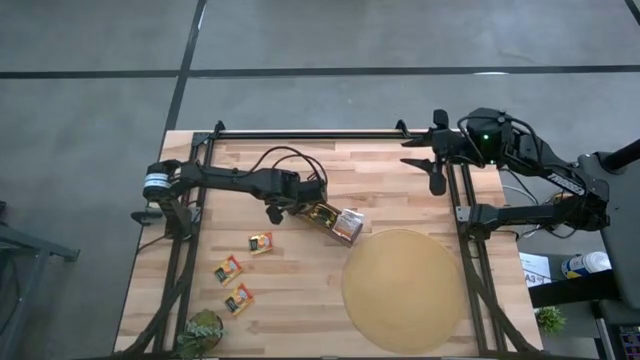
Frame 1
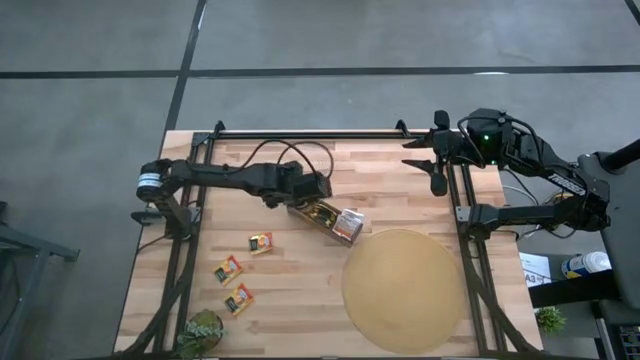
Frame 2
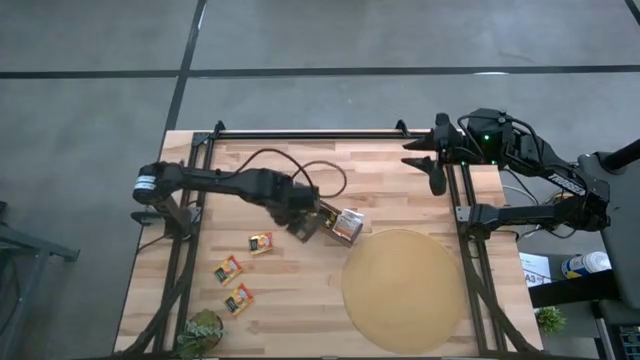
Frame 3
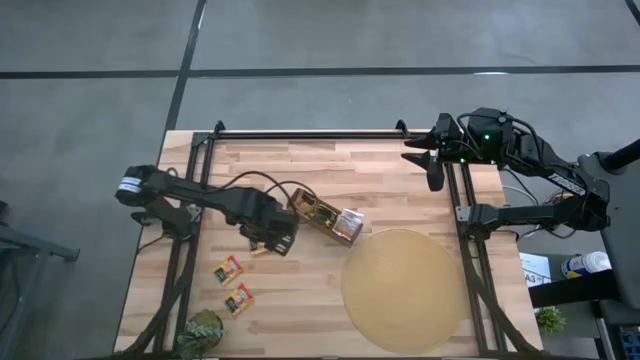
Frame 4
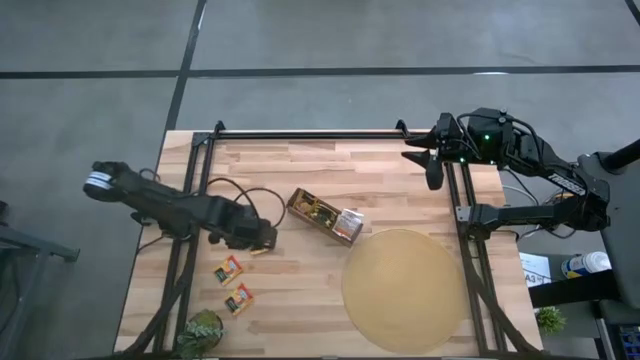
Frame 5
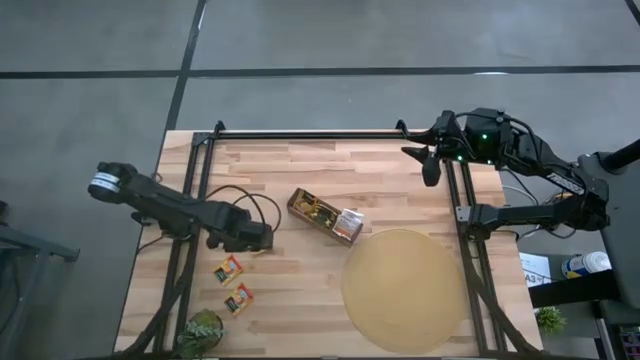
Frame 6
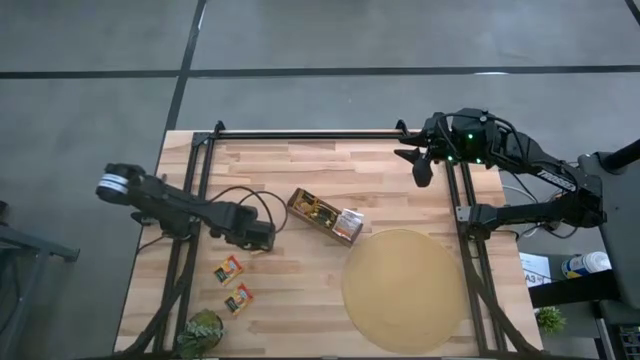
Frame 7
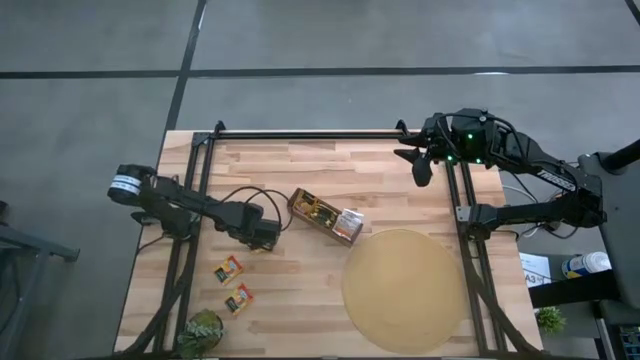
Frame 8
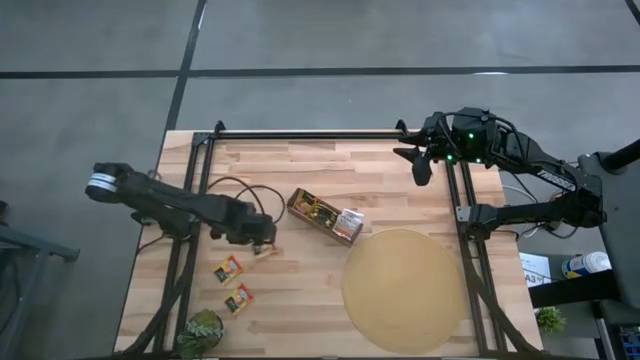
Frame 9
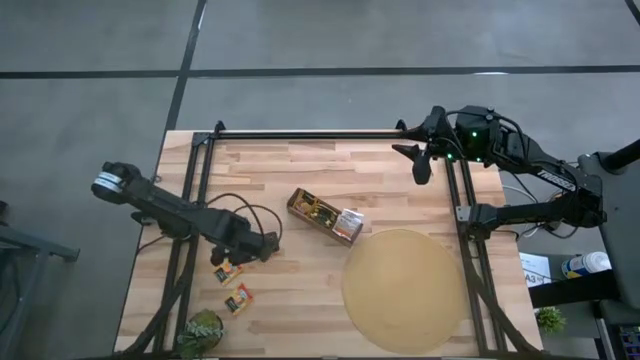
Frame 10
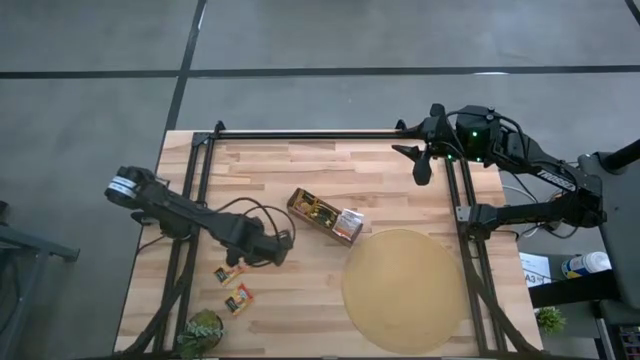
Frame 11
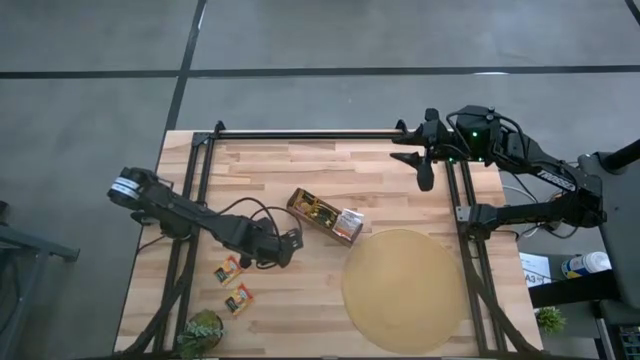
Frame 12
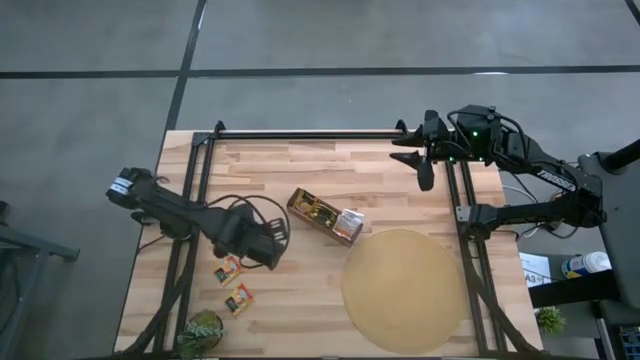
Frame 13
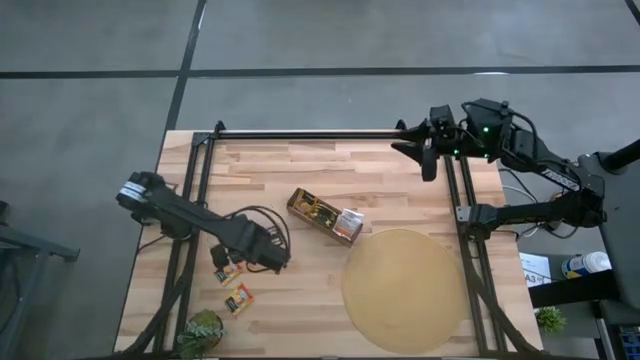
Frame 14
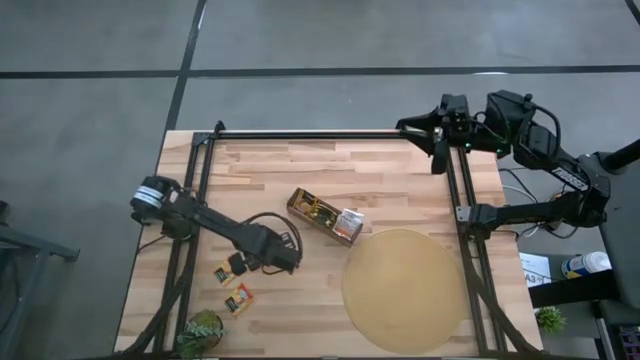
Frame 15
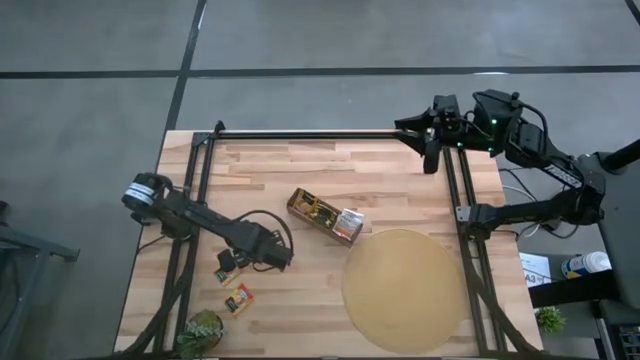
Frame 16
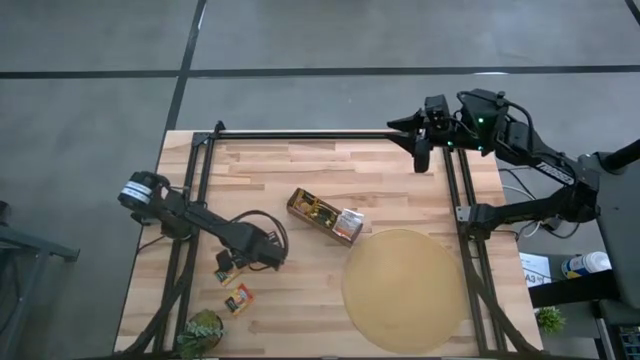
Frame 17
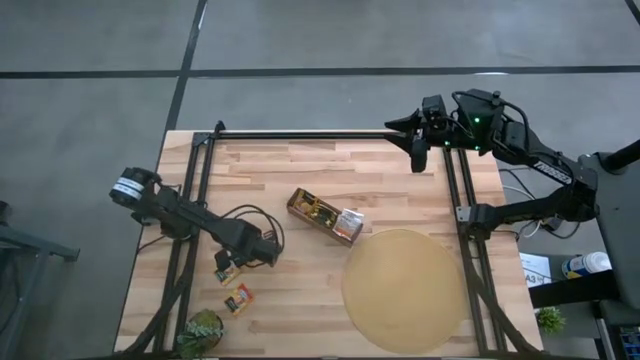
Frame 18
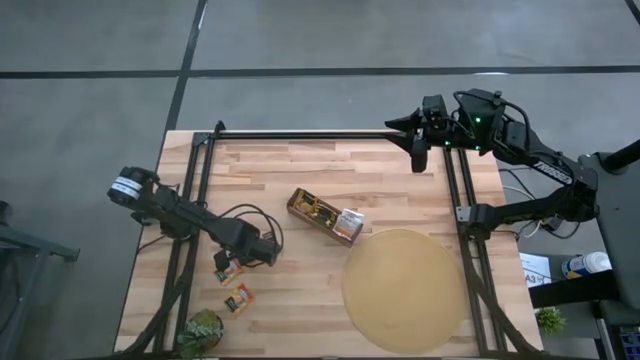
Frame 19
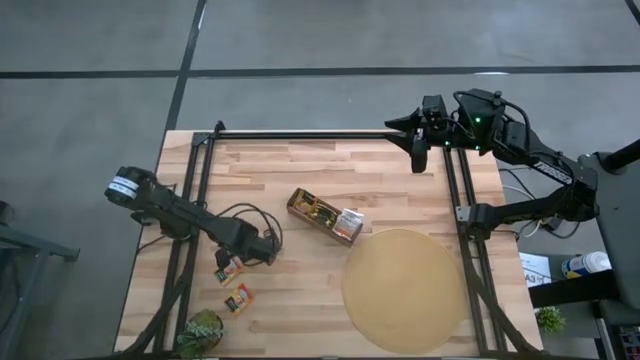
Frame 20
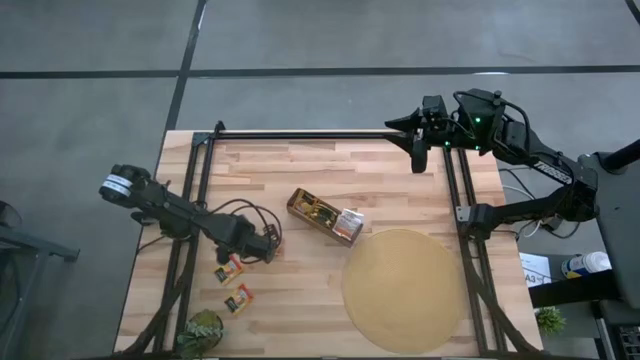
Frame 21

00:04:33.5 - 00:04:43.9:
Task: Pick & Place Tea
Put the orange tea bag into the left section of the wooden organizer

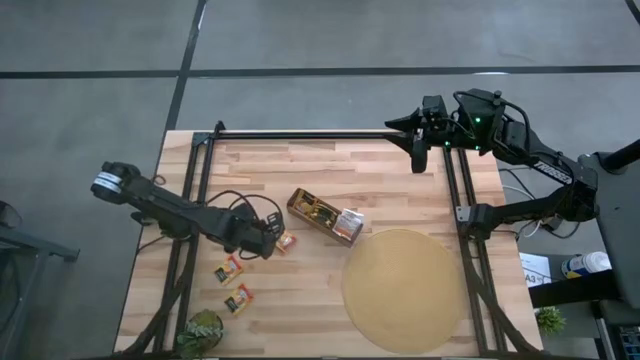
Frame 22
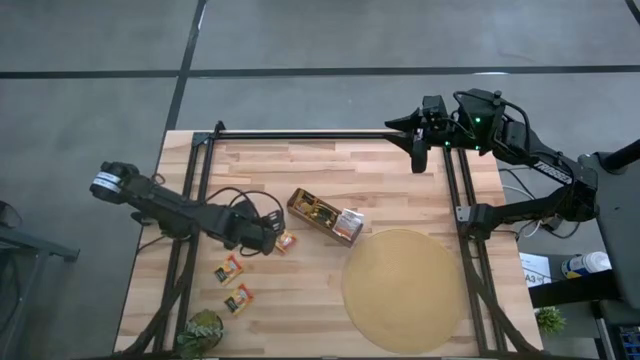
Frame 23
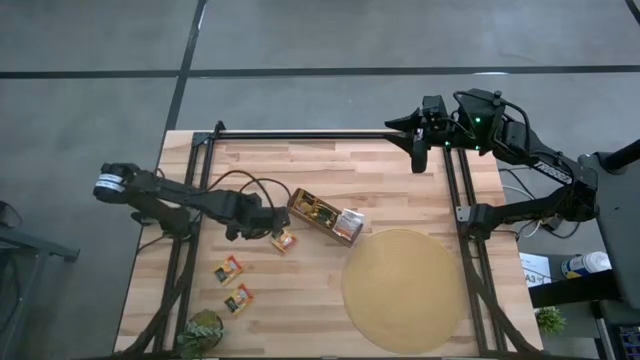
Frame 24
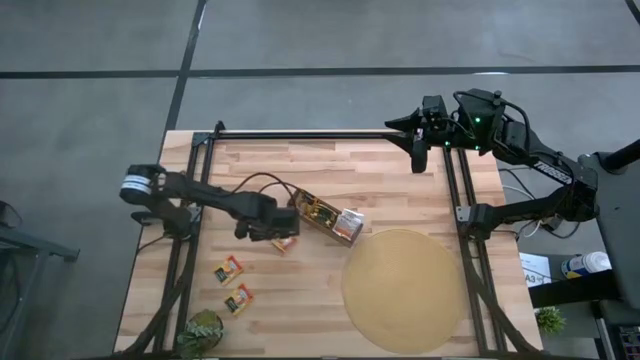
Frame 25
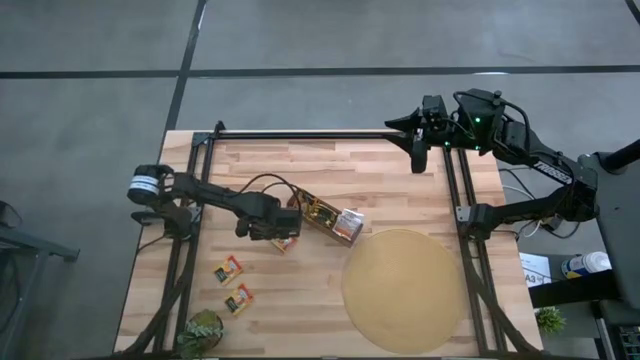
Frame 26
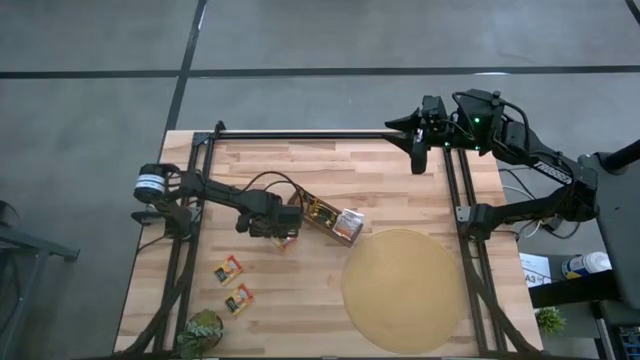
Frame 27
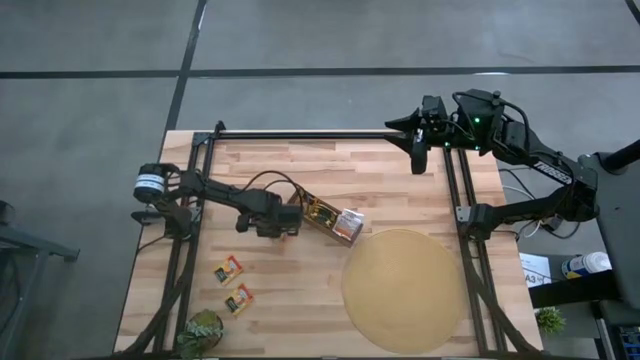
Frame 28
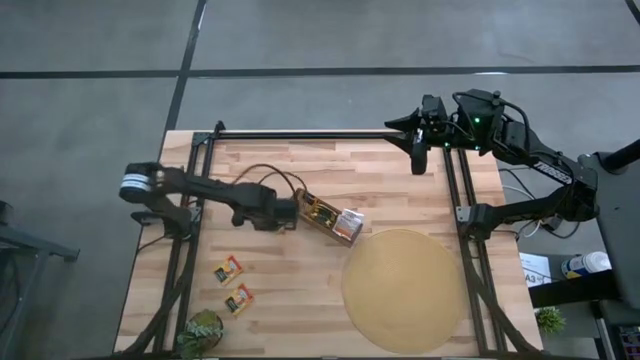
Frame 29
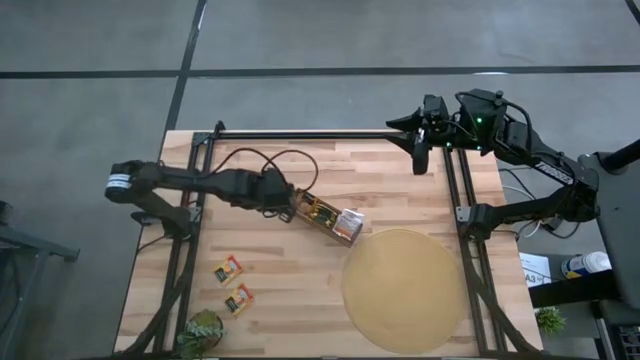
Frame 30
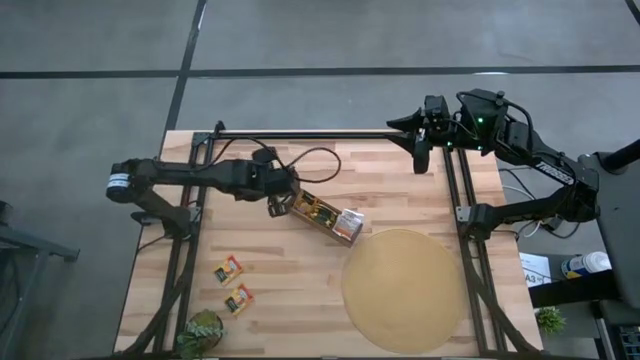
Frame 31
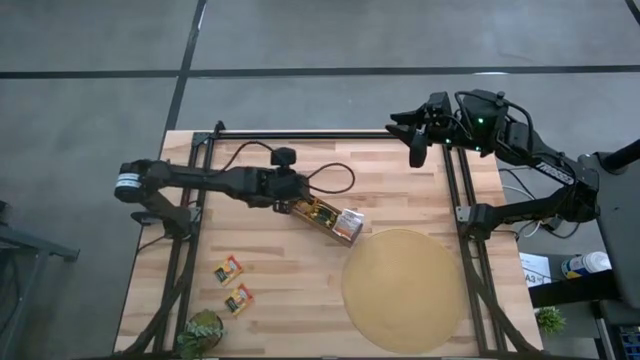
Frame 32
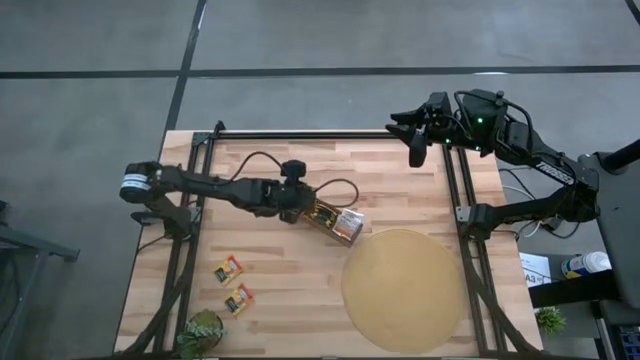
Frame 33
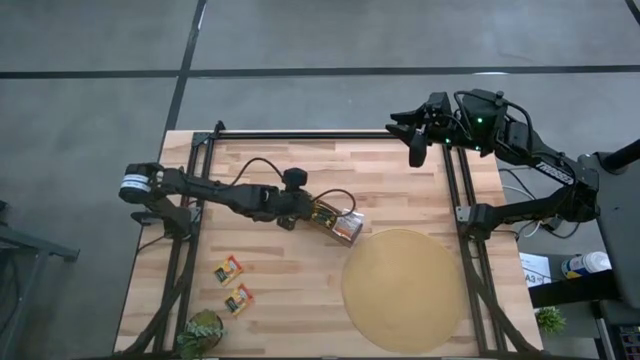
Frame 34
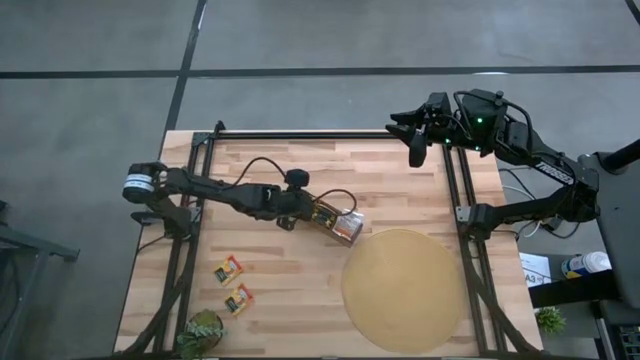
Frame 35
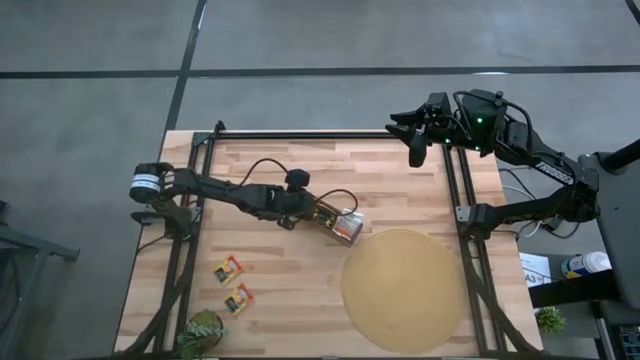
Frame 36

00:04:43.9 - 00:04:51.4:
Put the orange tea bag into the left section of the wooden organizer

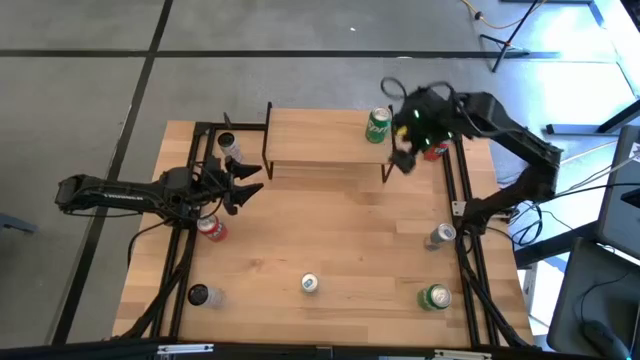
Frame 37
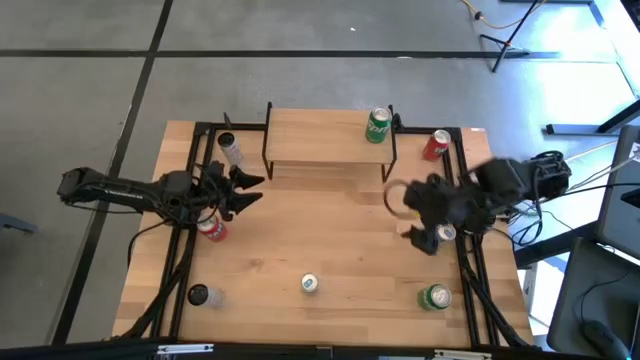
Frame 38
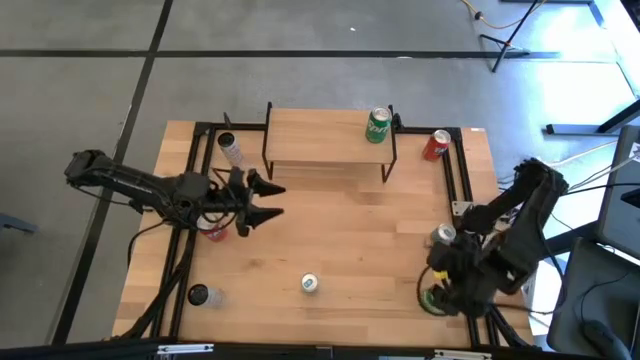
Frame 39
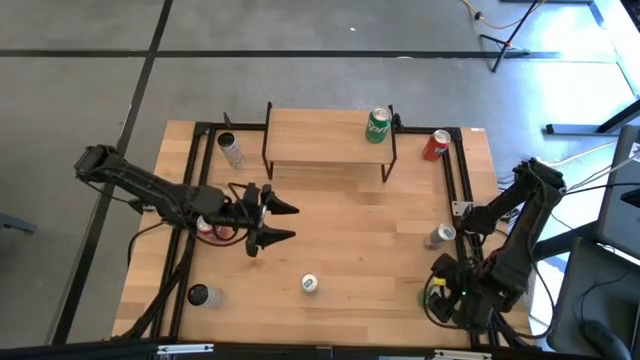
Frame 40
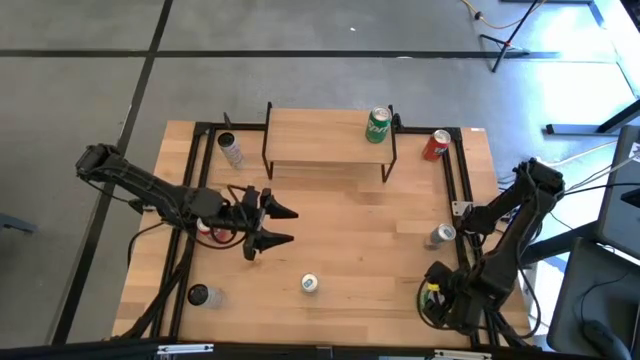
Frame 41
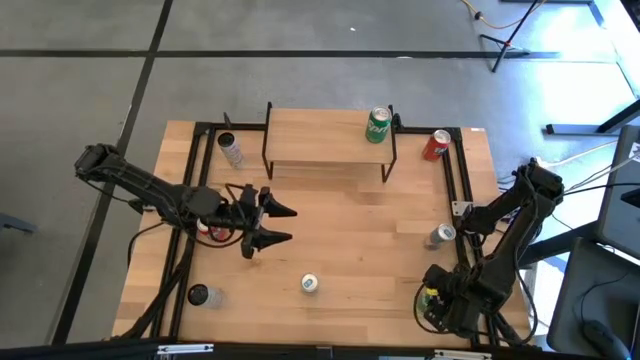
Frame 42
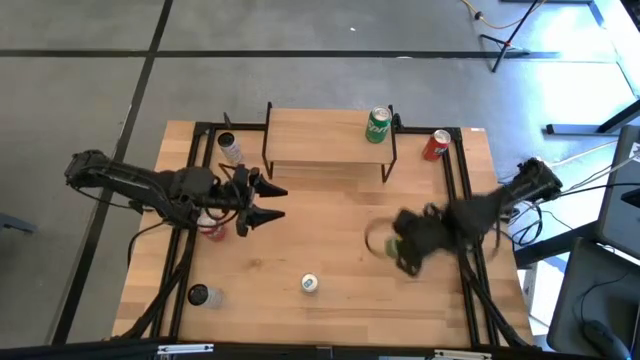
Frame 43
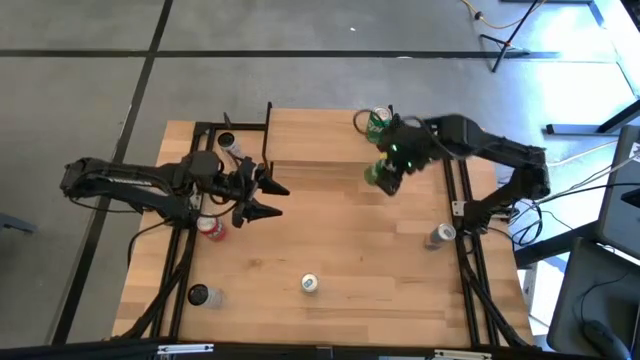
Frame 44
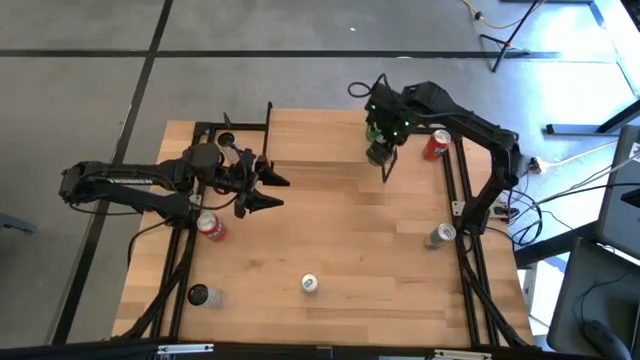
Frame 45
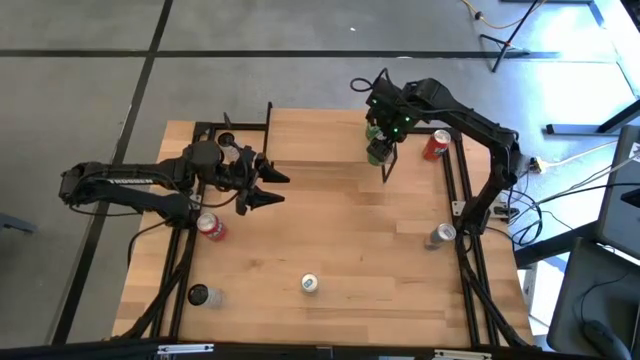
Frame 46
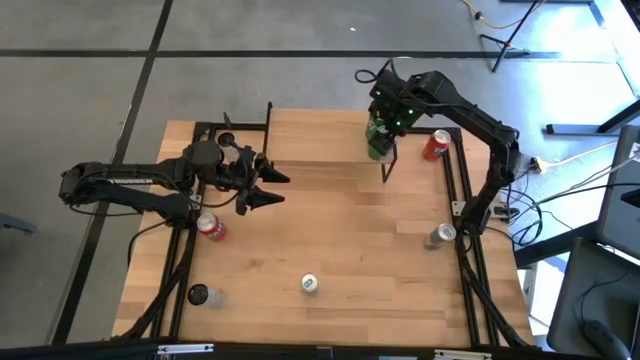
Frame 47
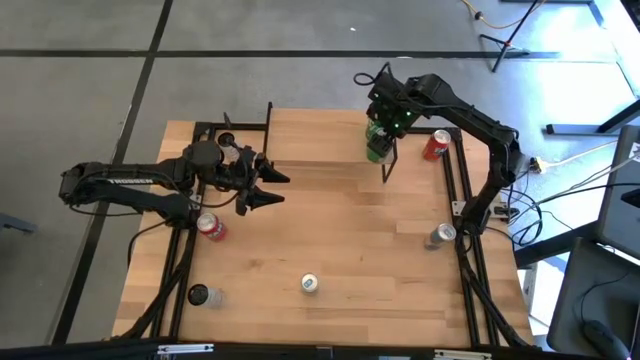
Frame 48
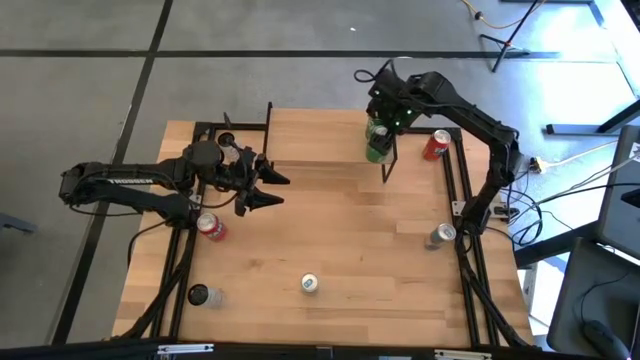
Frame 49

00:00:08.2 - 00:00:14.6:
Task: Place canned beverage on shelf
Put the green soda can on the shelf aligned with the other green soda can
